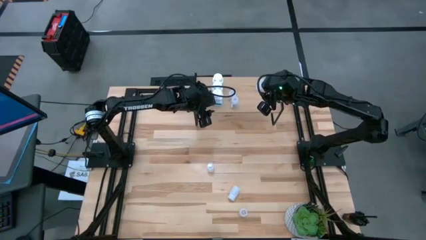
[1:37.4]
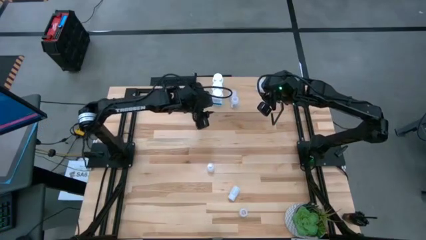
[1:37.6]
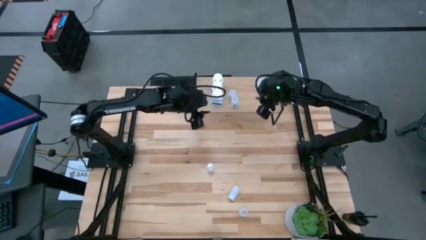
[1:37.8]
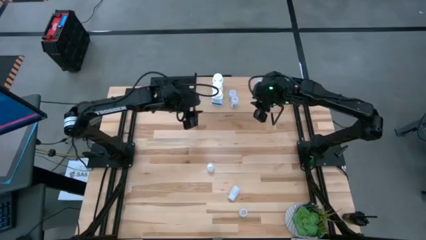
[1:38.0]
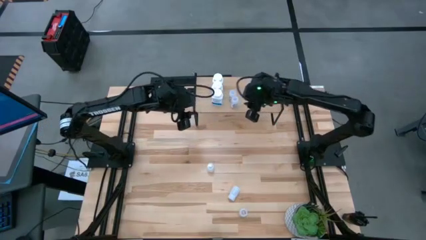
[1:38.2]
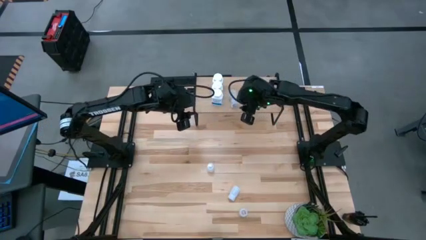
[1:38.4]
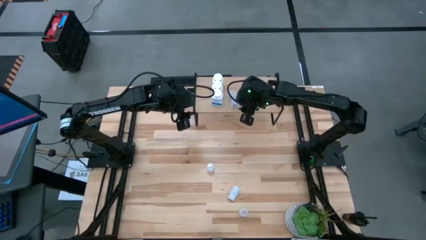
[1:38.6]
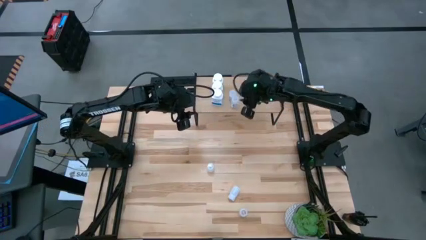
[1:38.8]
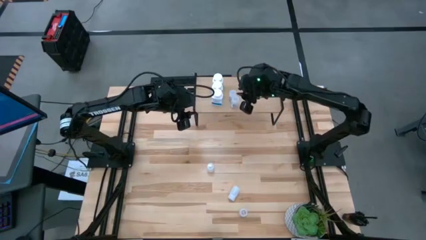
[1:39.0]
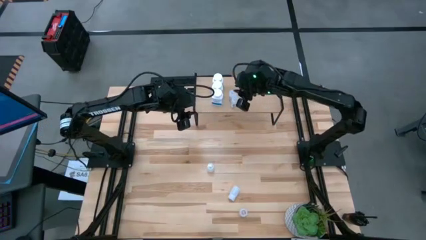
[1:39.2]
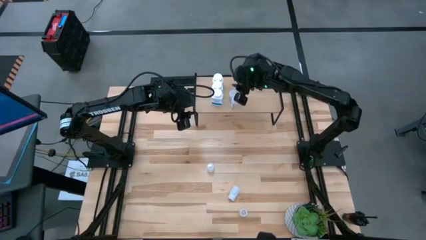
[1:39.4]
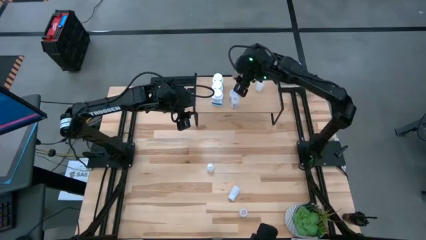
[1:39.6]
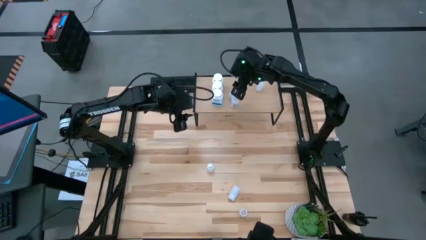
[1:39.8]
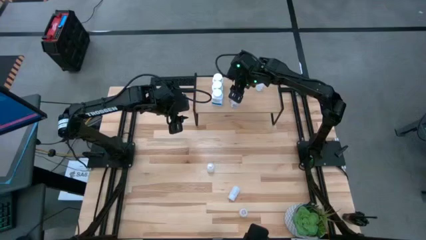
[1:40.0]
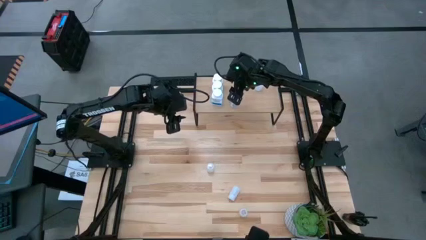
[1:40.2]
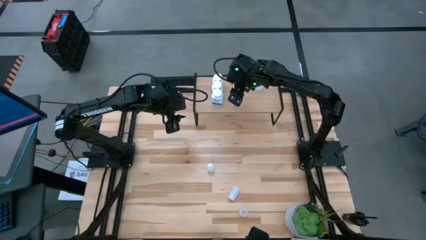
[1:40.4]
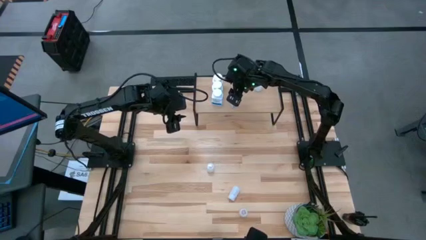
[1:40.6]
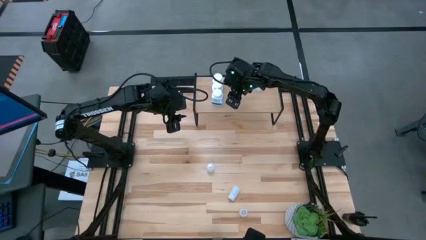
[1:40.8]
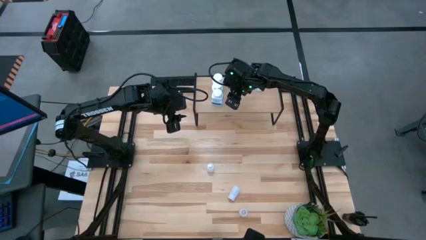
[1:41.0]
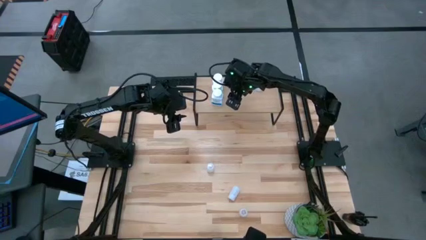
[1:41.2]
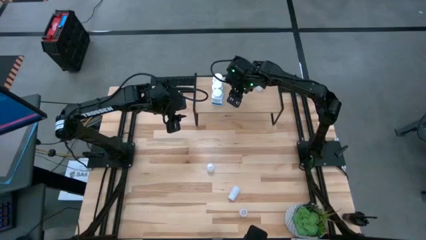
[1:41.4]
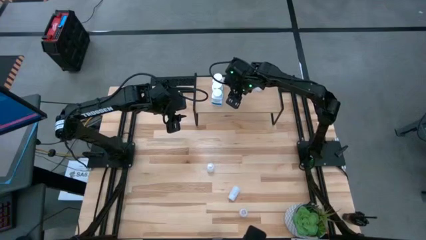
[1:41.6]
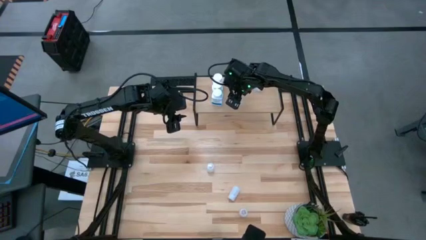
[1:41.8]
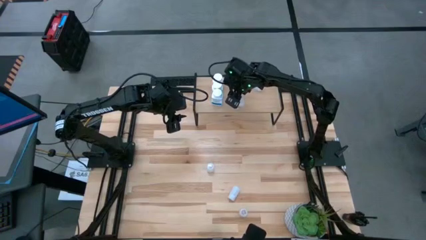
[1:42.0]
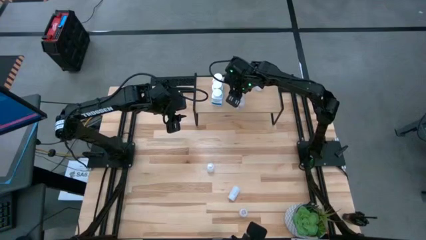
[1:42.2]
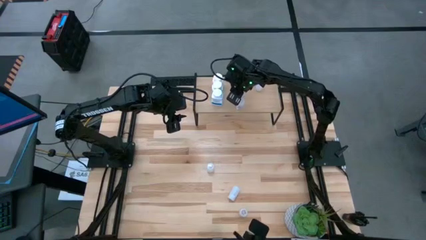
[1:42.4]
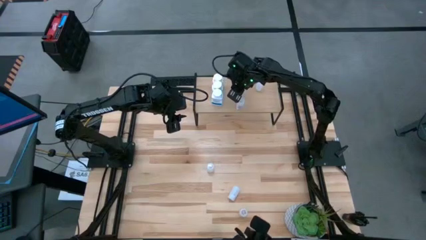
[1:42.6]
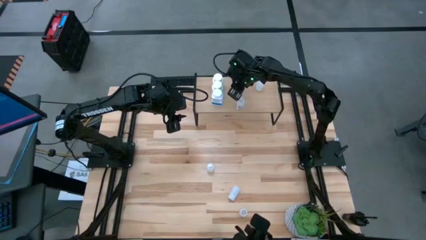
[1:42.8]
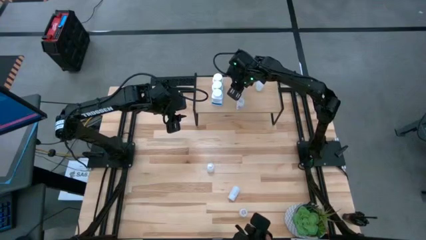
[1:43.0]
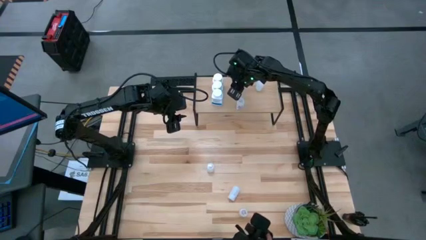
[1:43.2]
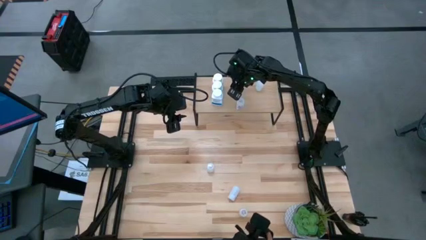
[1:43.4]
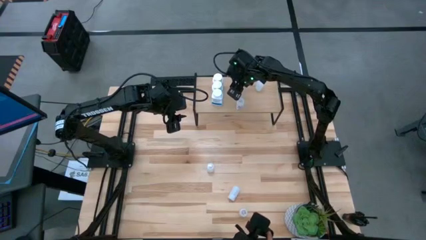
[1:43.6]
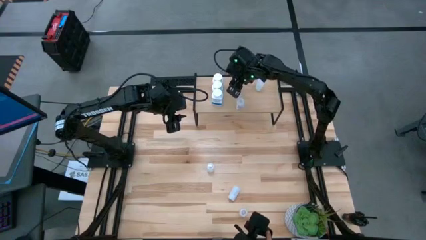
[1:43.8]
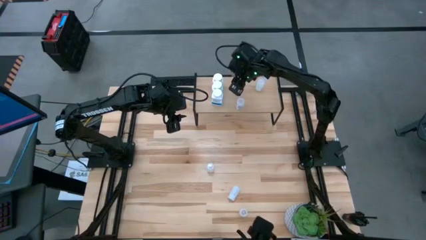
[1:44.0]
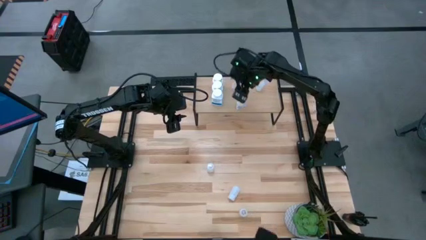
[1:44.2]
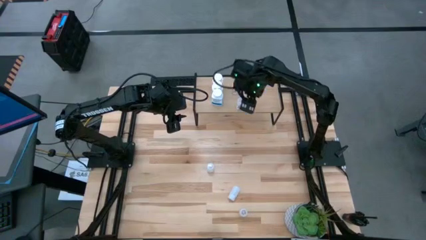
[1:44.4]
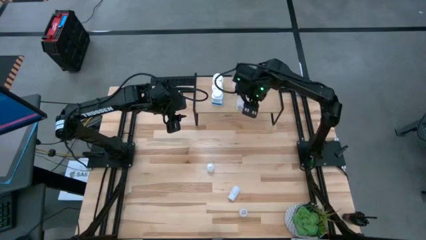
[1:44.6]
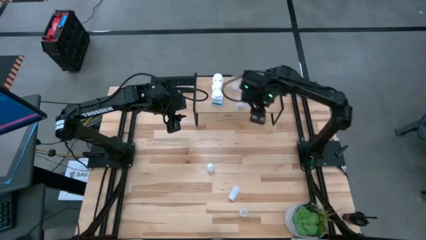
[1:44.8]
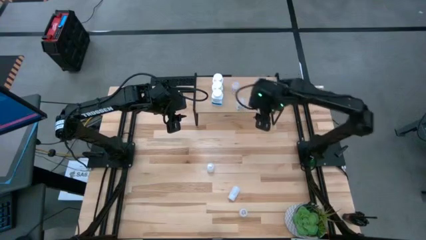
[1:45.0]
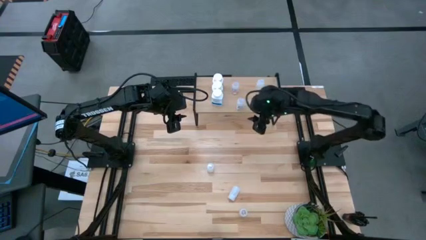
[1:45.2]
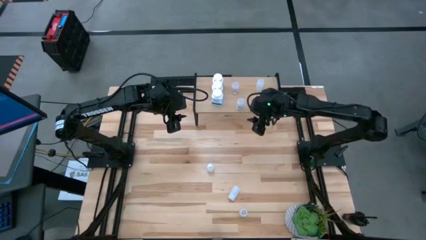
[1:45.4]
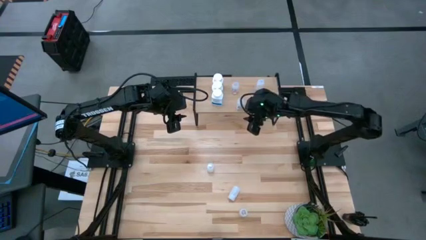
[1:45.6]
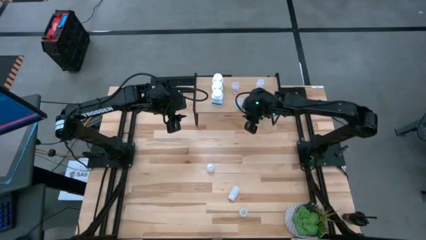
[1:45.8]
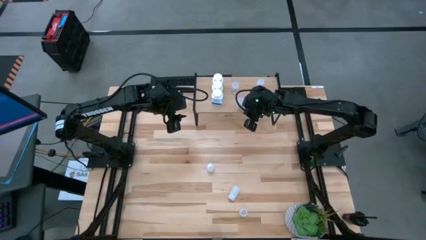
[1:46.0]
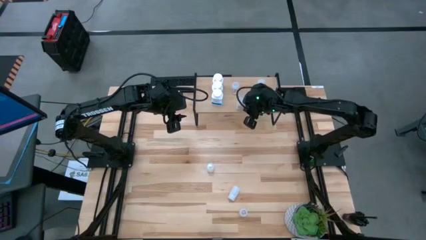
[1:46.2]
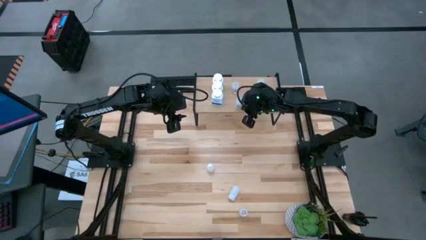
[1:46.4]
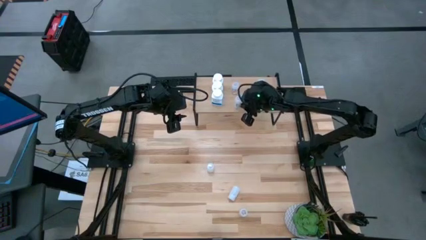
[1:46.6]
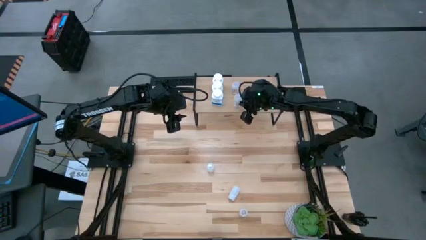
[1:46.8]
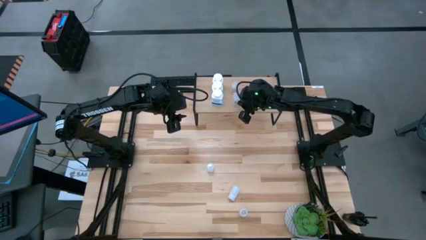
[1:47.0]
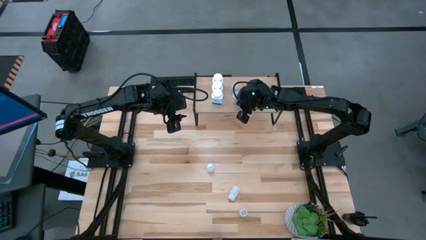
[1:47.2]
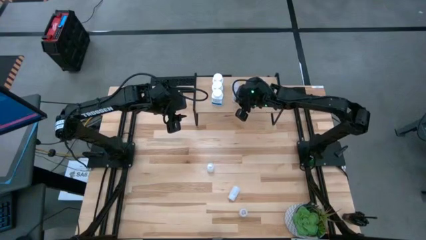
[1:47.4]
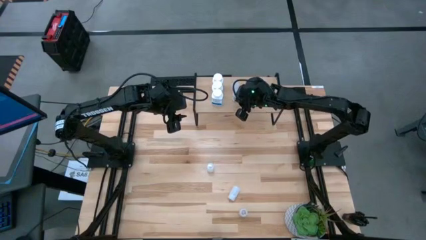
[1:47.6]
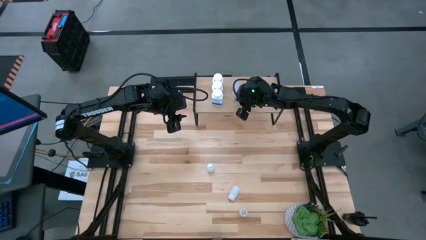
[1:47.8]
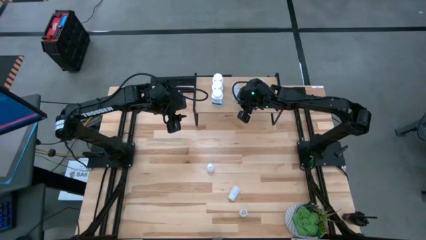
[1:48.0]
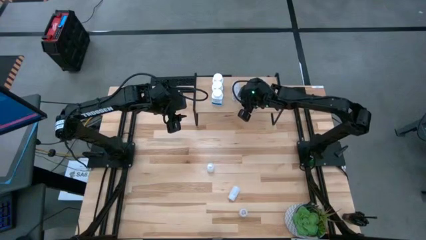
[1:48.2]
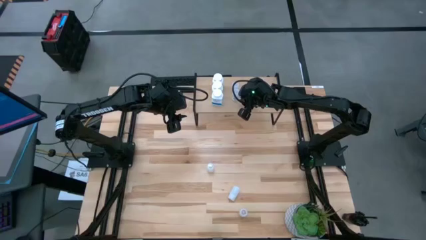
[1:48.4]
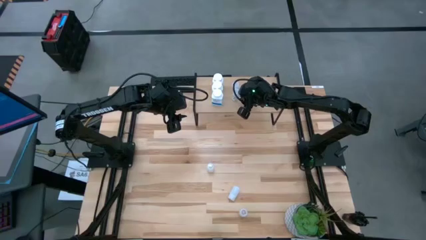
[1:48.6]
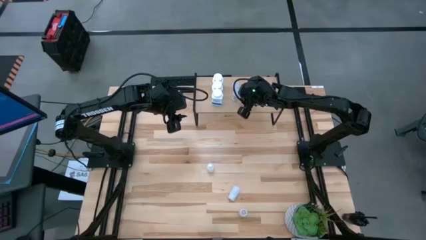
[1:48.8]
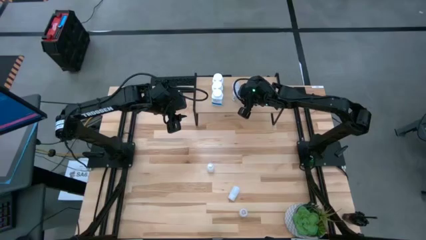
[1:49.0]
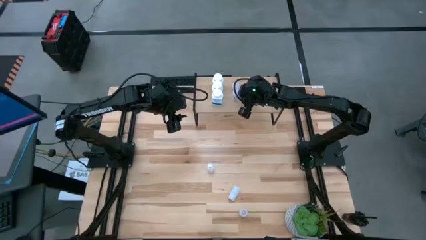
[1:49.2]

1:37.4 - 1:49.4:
Task: Pick and place medicine bottles onto shelf by color
Adjust the transparent pill bottles on the shelf

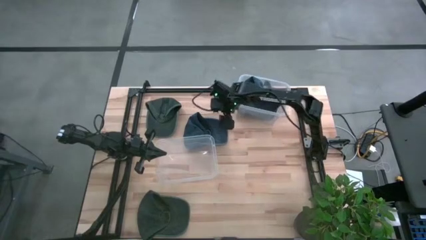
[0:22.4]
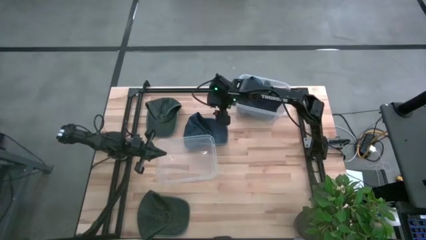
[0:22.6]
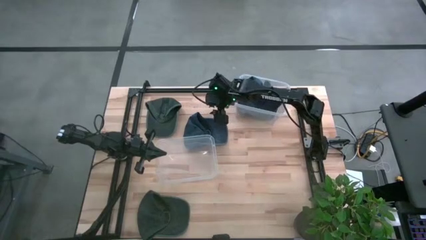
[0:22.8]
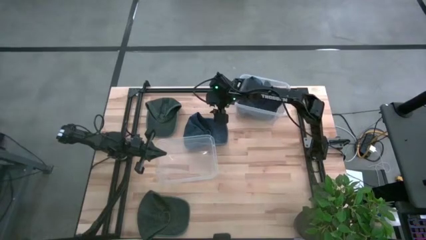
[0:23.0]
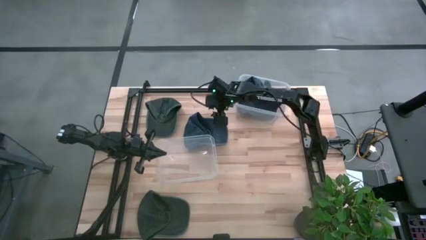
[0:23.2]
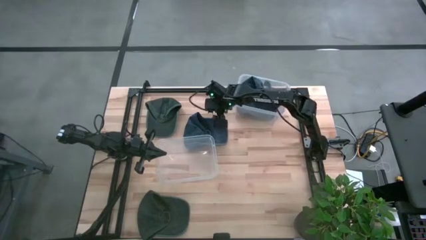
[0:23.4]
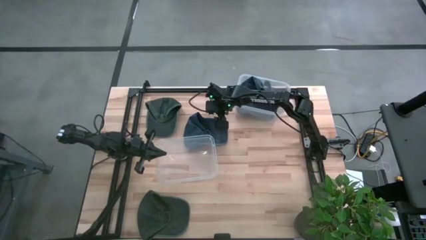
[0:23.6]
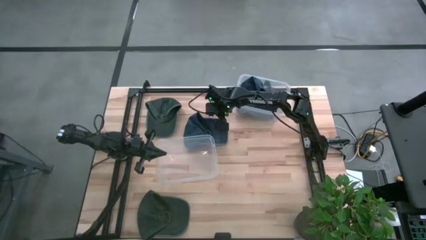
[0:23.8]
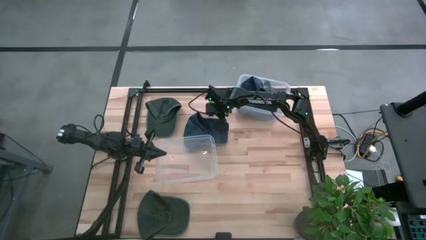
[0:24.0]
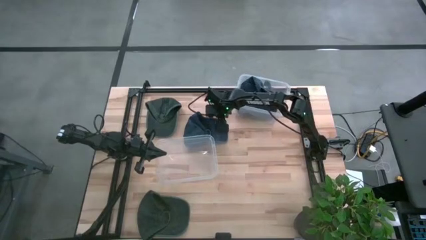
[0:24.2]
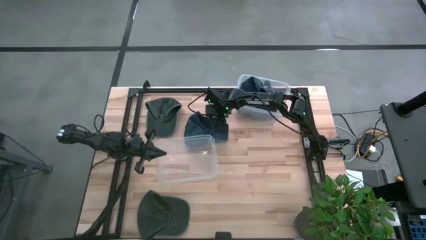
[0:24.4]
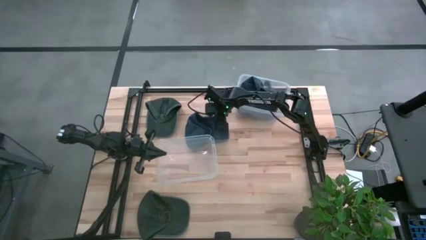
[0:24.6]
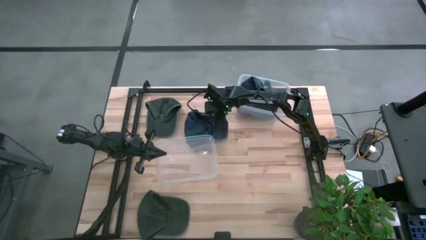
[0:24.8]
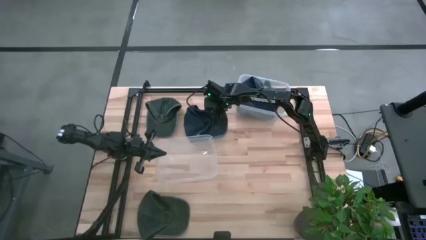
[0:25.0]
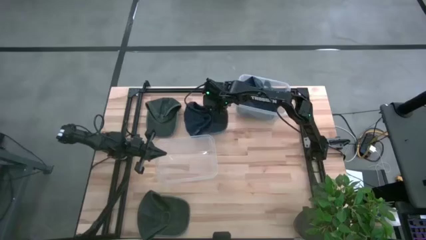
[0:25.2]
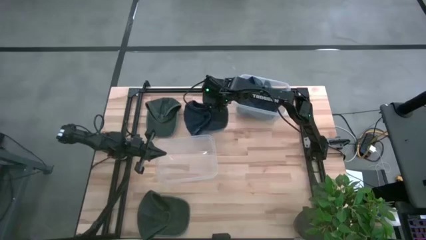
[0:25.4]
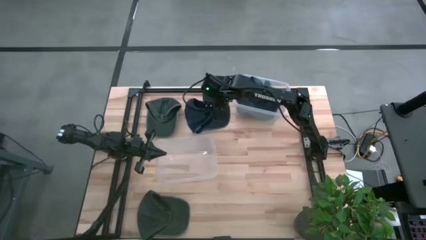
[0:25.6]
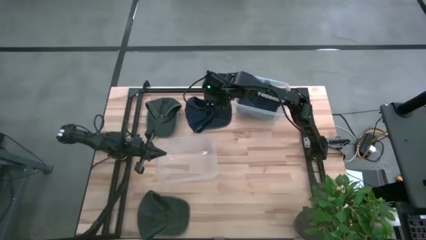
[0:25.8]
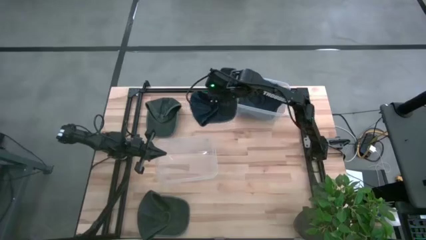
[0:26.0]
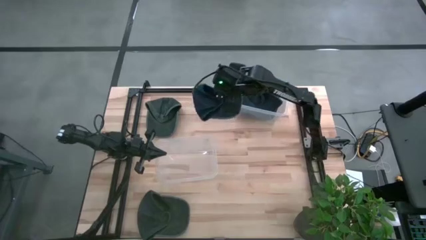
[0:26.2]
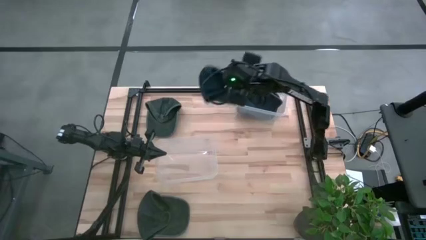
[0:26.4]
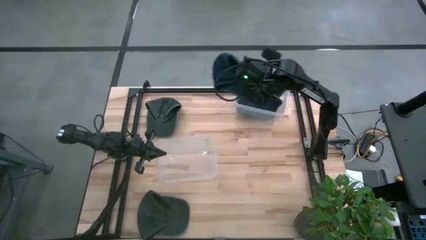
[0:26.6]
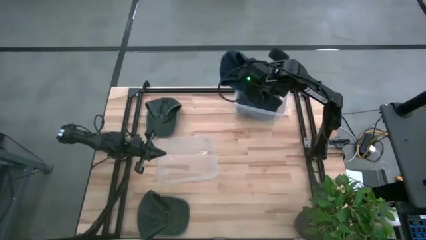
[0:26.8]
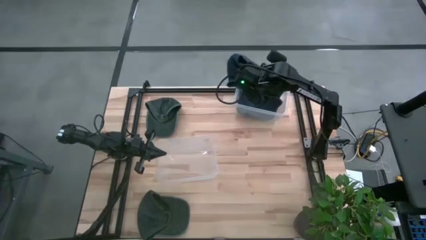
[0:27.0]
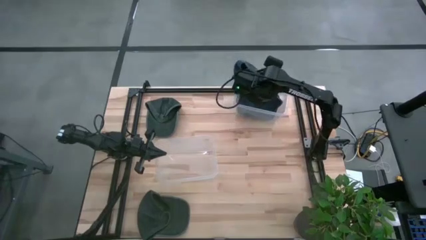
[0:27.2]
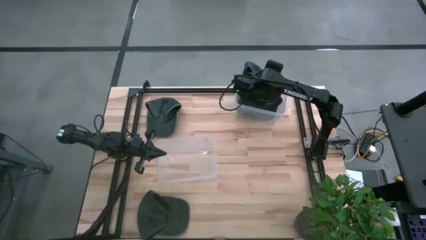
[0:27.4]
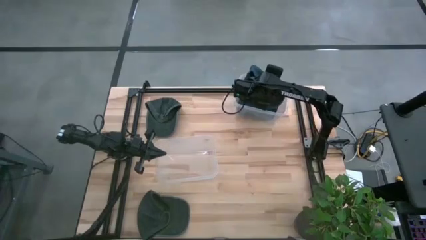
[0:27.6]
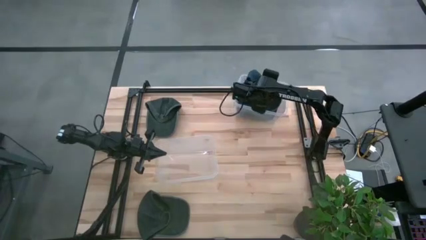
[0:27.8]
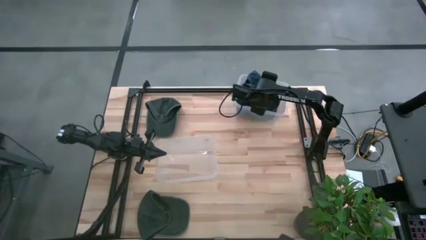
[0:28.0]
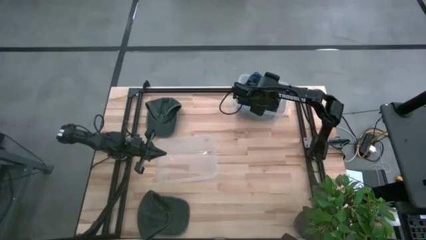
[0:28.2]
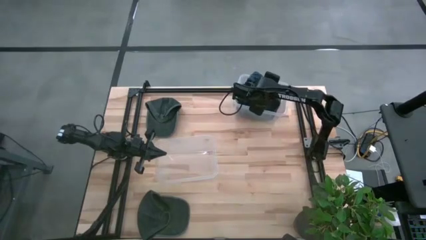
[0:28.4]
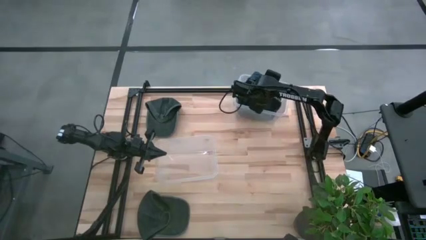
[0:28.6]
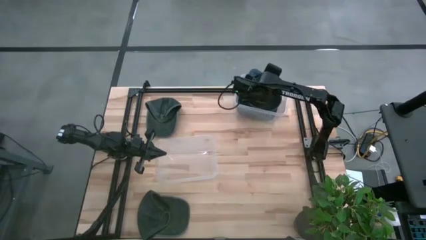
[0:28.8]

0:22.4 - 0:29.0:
Task: Pick & Place hat
Put the blue cap into the top transparent bin
